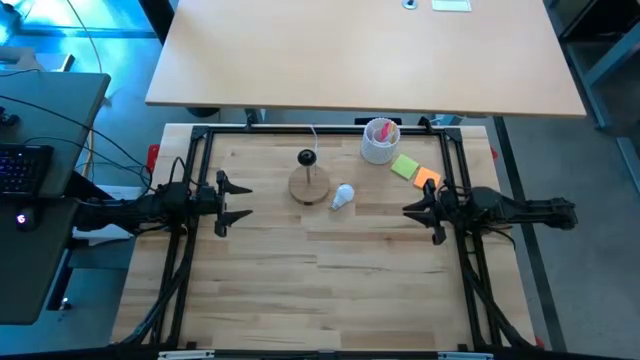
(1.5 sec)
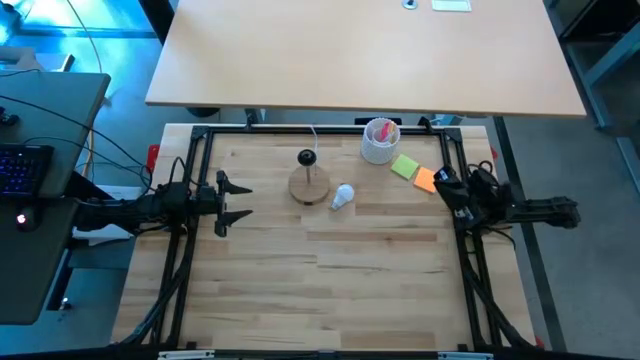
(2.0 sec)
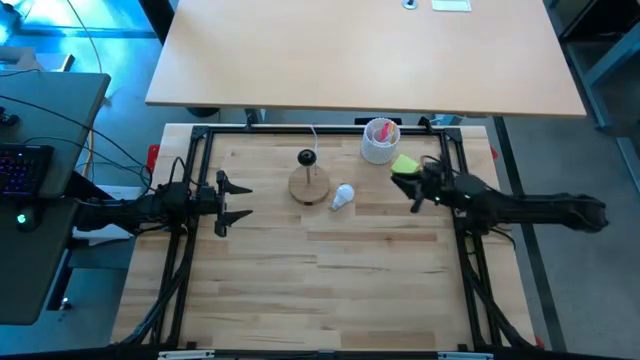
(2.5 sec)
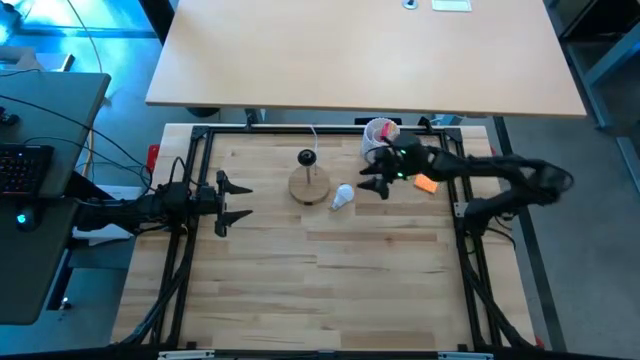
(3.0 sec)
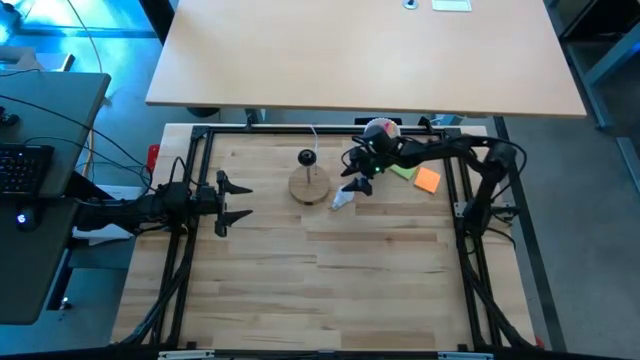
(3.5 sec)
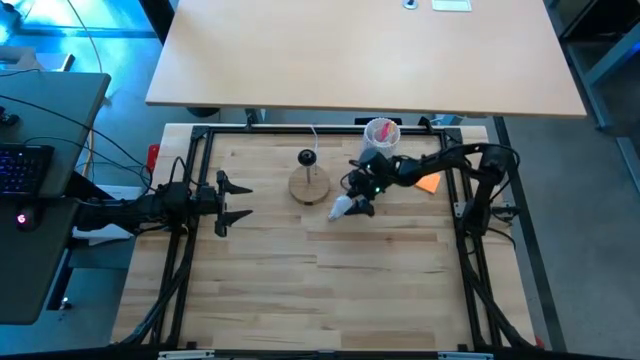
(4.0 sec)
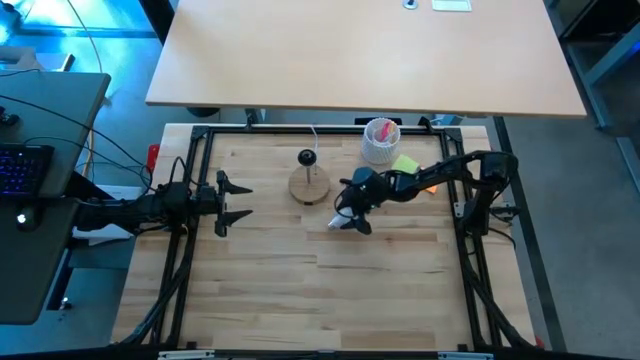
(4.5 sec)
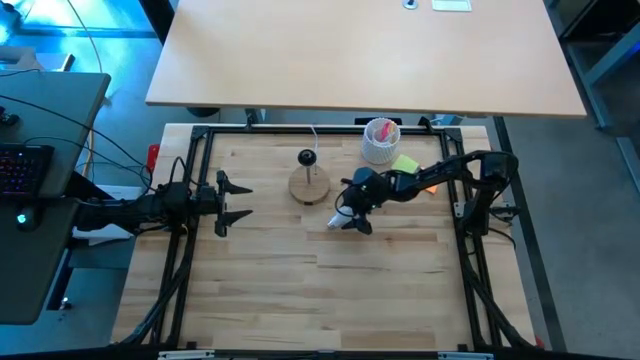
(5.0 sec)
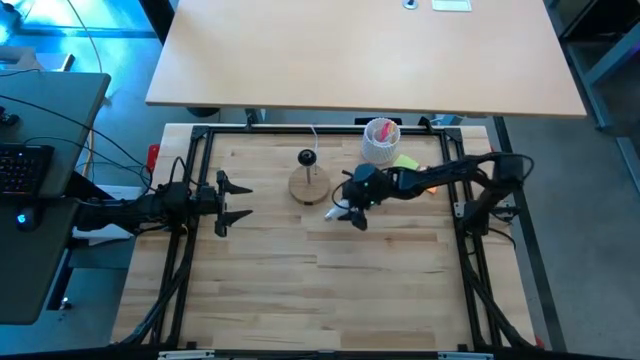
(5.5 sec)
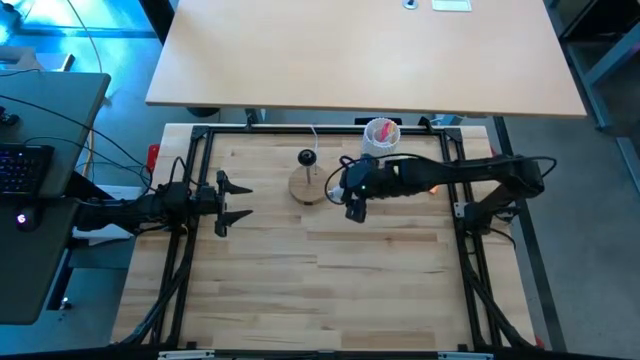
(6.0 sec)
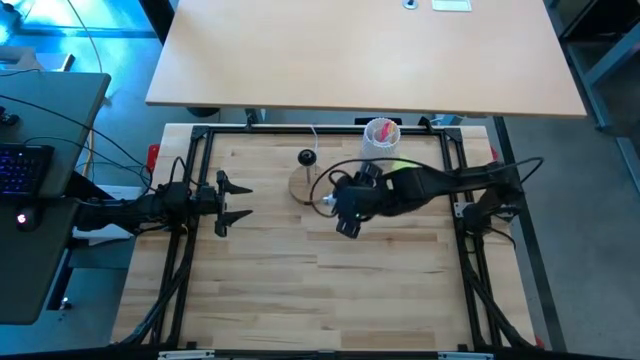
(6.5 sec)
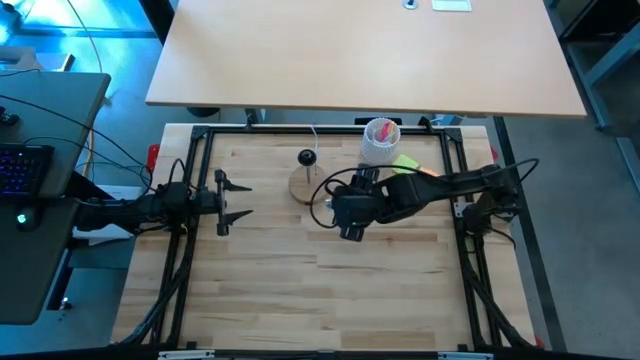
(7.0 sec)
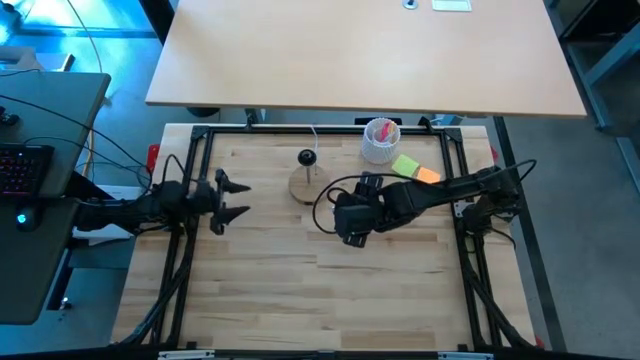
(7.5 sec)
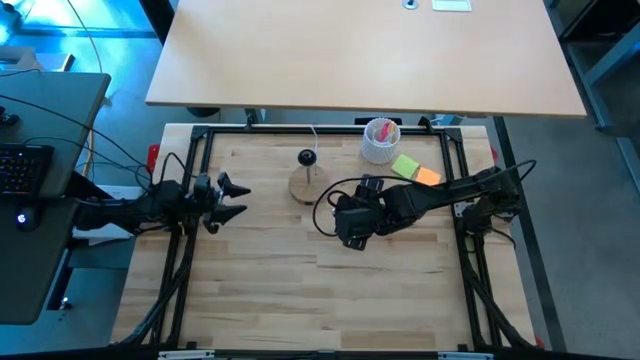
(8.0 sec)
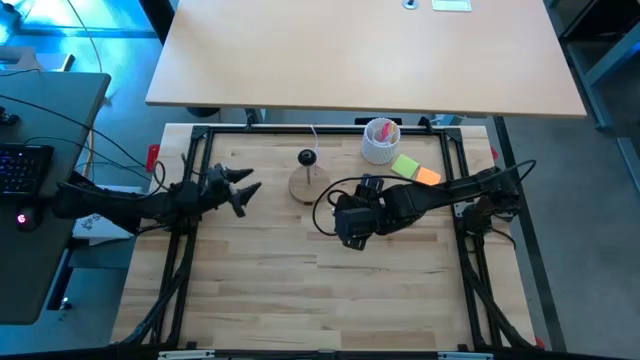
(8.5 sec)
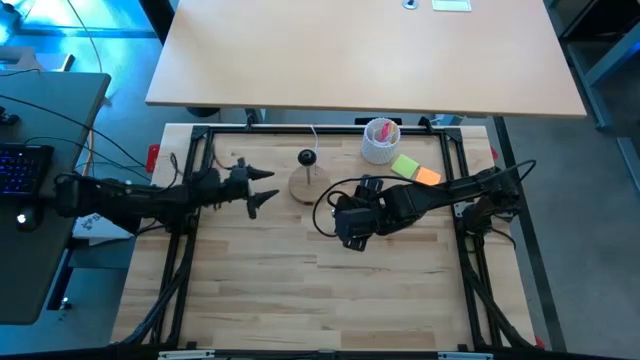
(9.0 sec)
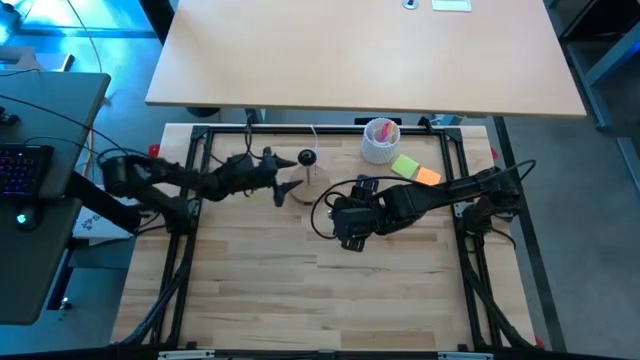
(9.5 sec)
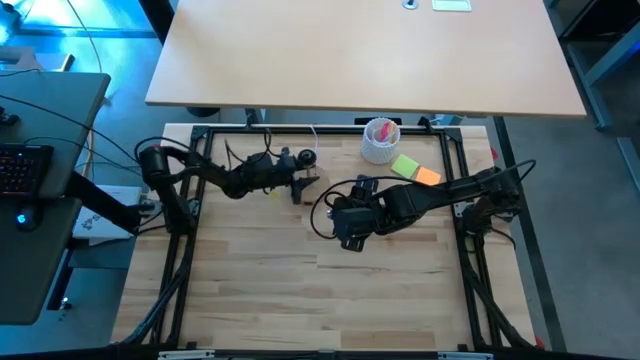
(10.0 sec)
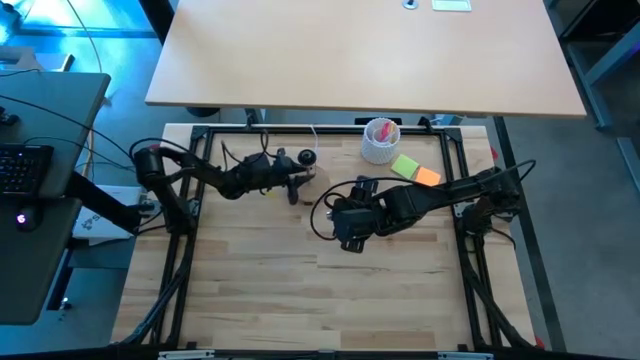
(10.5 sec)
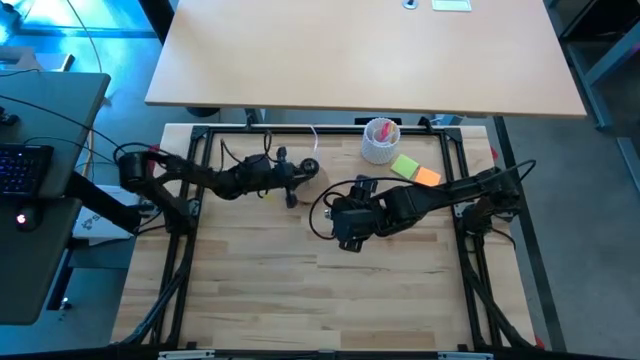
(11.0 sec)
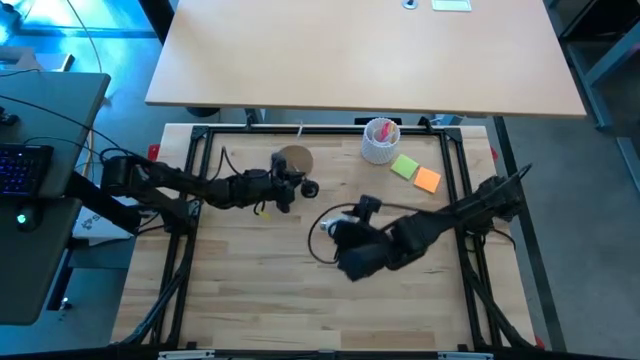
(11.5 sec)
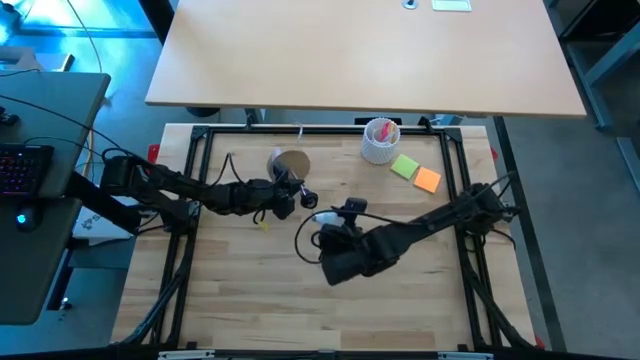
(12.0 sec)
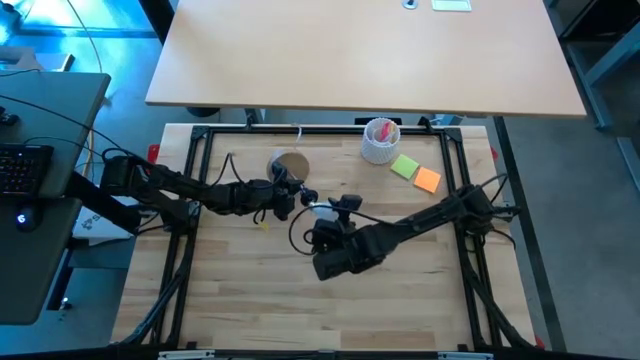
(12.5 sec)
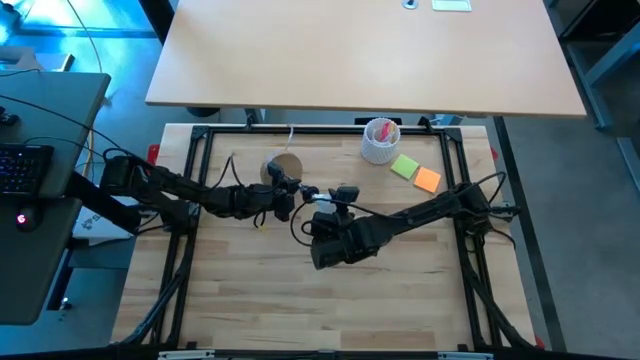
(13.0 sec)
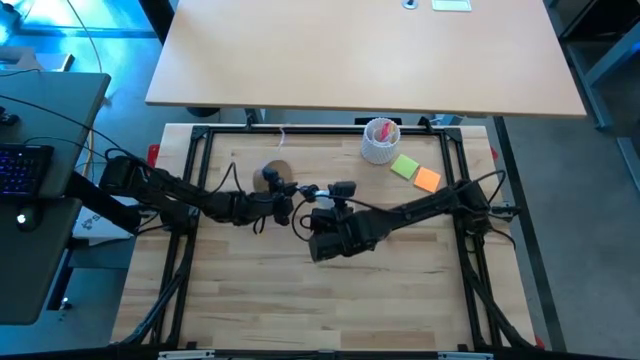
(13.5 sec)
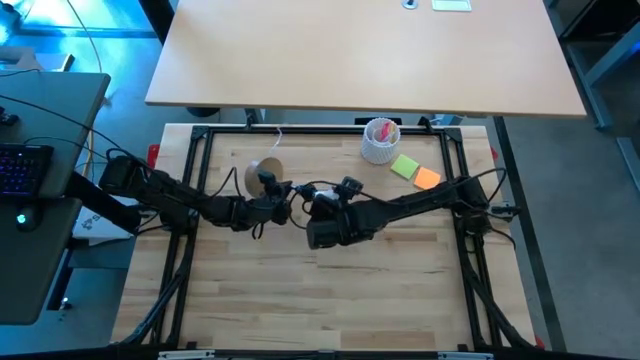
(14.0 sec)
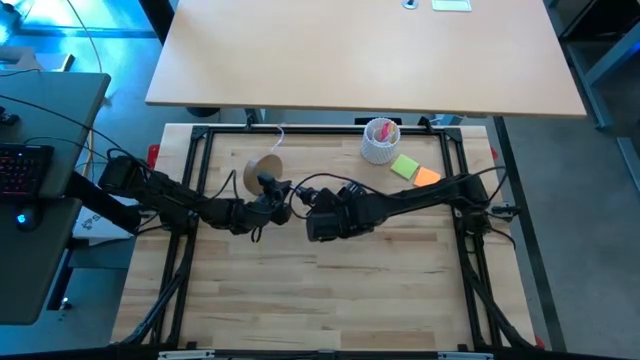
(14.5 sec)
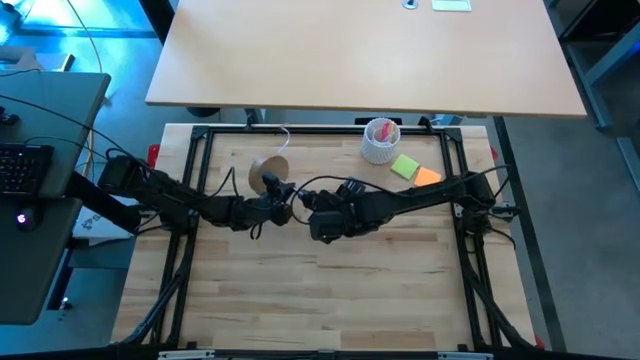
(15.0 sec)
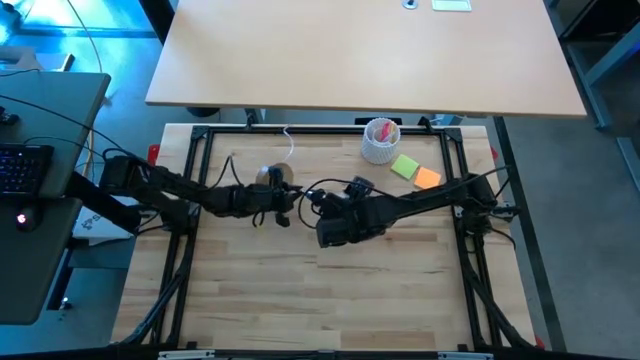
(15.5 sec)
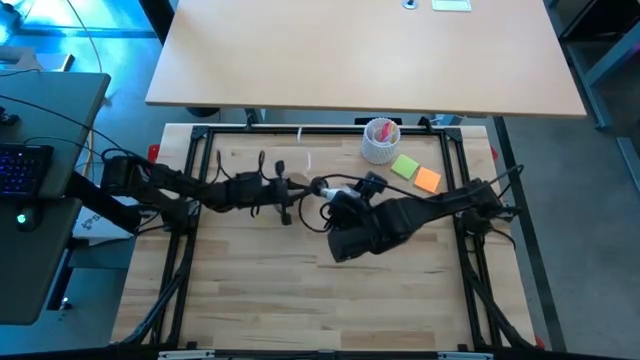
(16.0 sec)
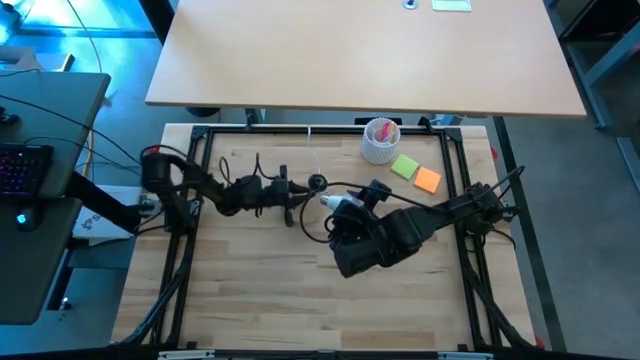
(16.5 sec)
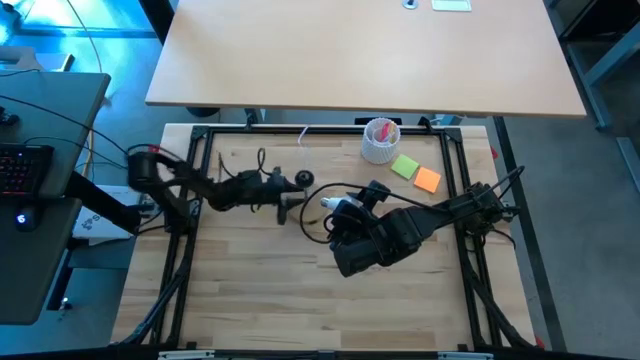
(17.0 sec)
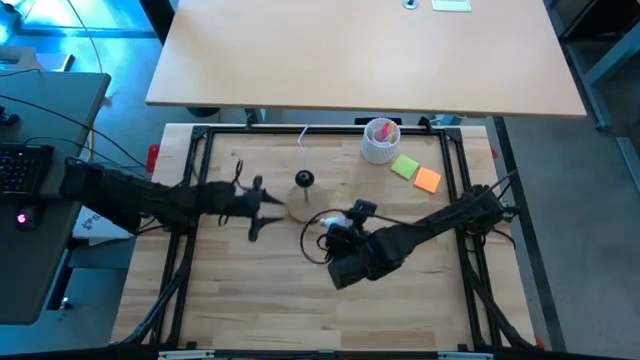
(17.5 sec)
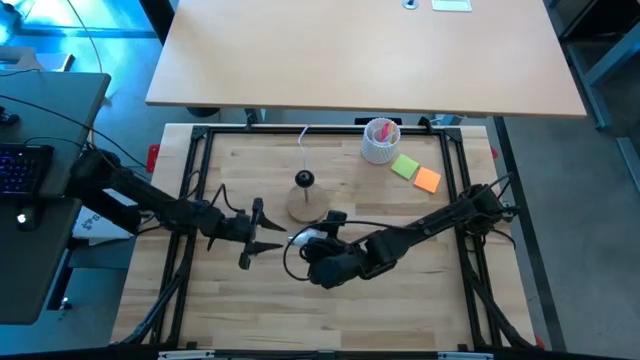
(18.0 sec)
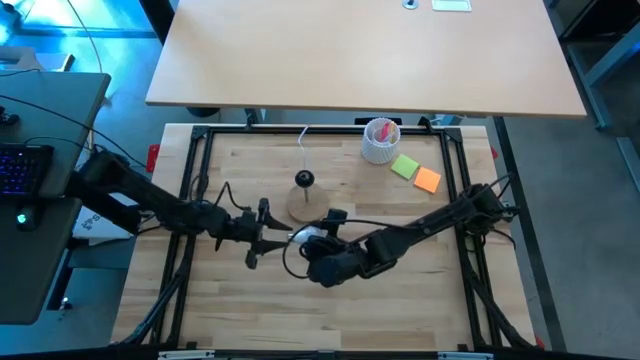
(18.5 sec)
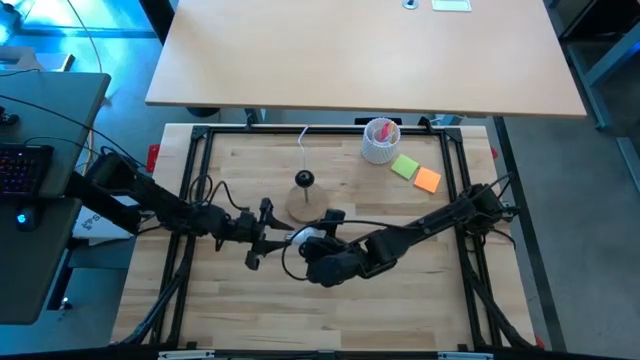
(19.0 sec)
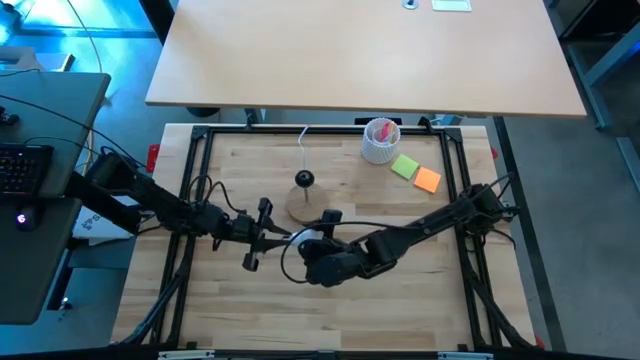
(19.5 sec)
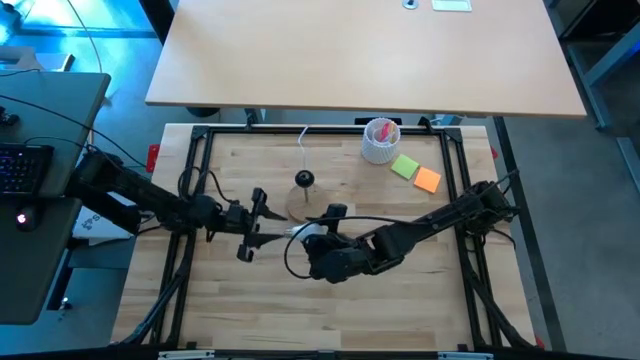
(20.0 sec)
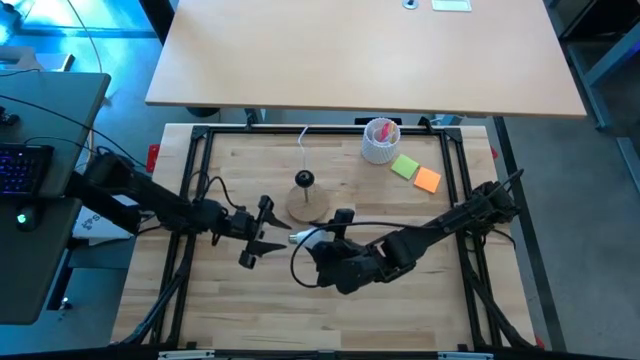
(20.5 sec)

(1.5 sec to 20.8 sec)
Task: Screw lightbulb
Insert the light bulb into the lamp
